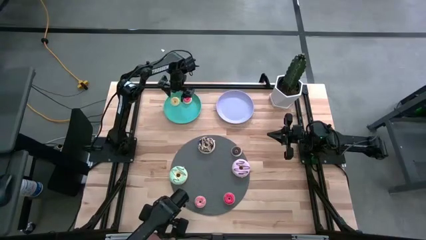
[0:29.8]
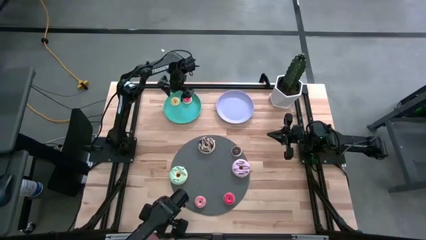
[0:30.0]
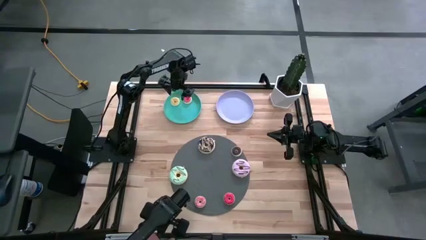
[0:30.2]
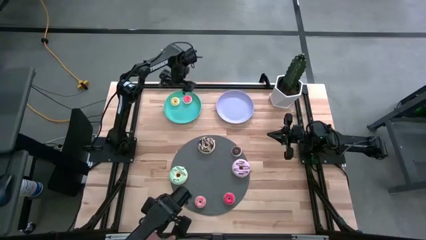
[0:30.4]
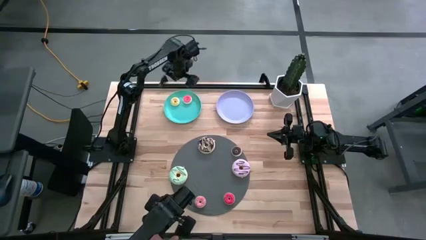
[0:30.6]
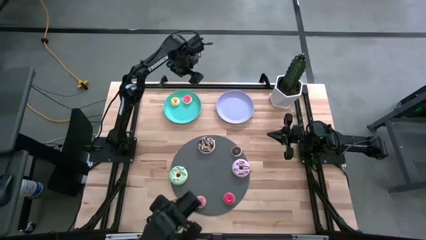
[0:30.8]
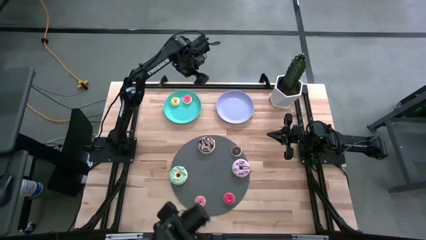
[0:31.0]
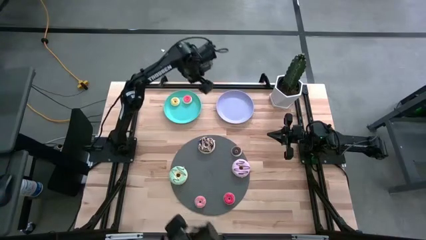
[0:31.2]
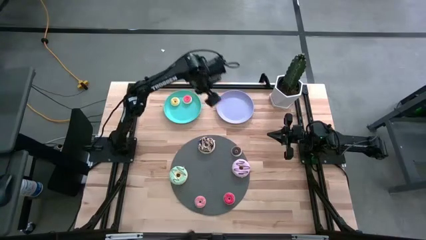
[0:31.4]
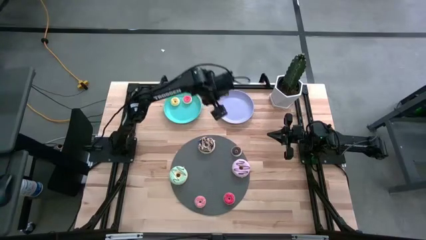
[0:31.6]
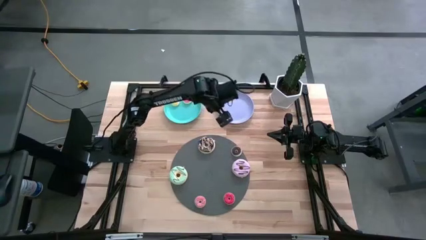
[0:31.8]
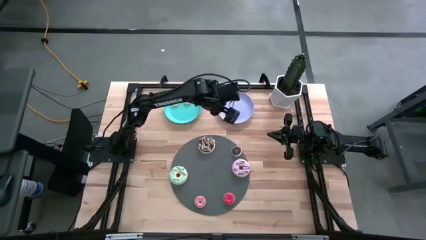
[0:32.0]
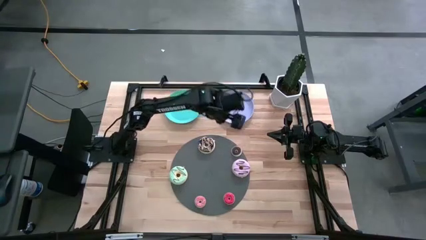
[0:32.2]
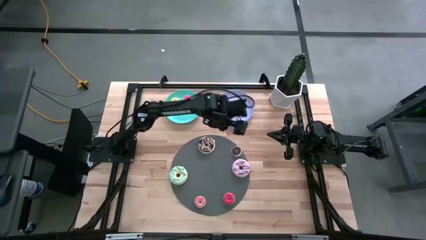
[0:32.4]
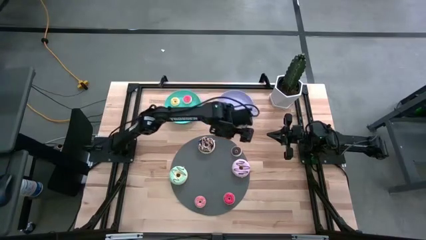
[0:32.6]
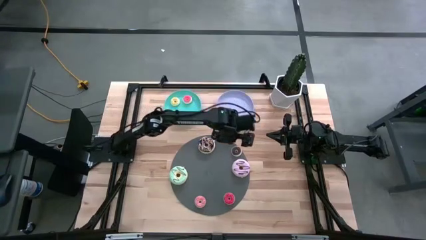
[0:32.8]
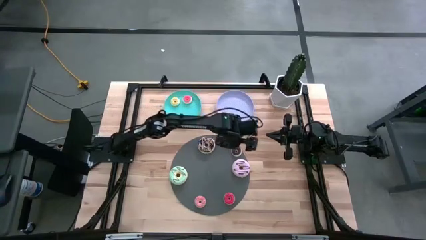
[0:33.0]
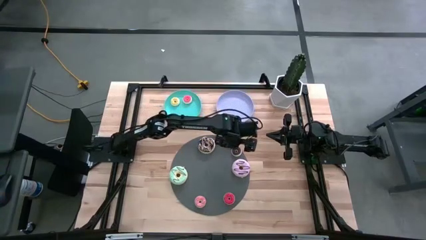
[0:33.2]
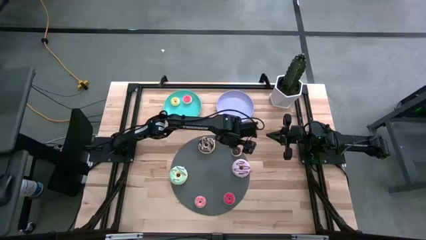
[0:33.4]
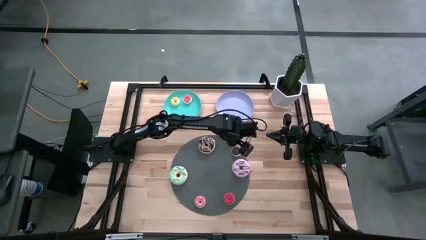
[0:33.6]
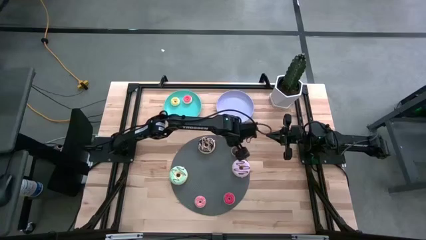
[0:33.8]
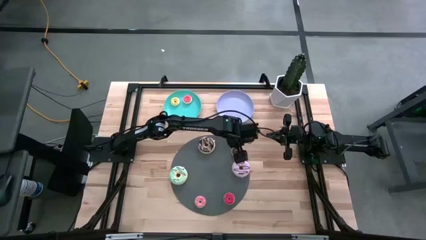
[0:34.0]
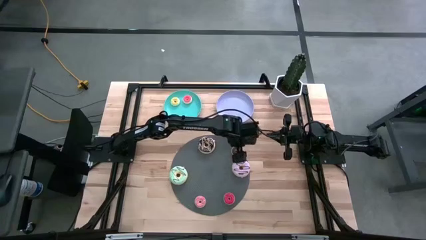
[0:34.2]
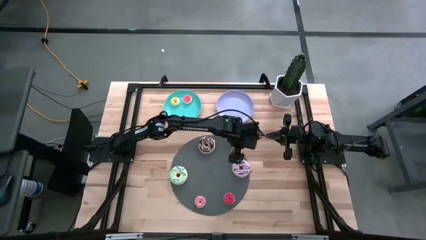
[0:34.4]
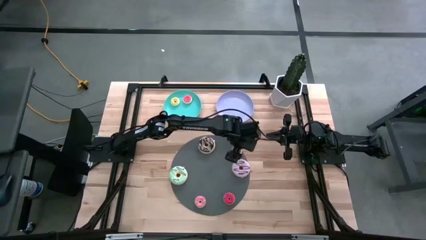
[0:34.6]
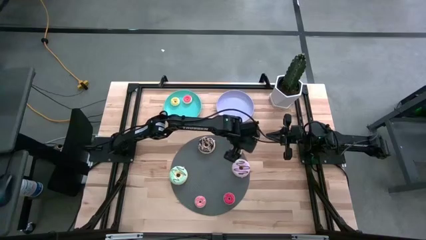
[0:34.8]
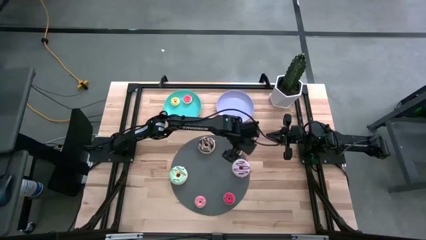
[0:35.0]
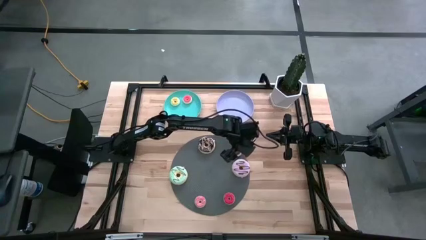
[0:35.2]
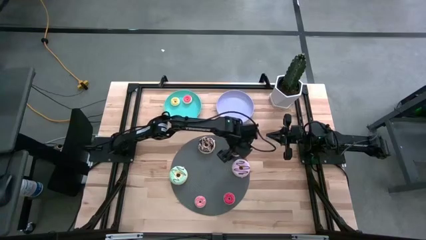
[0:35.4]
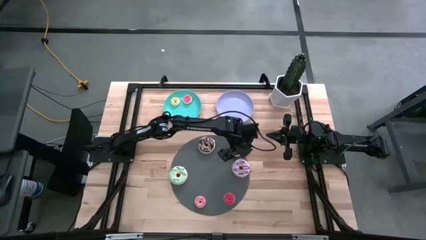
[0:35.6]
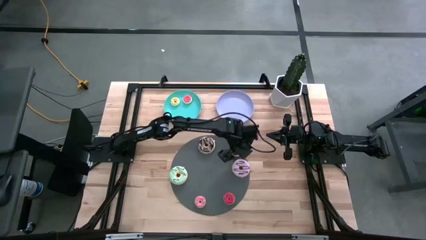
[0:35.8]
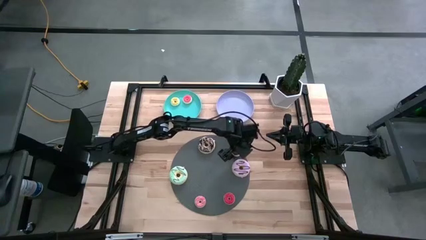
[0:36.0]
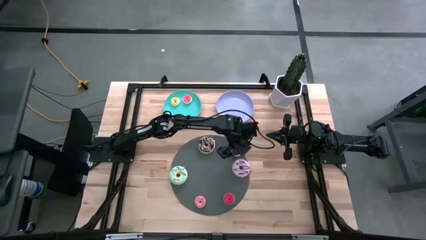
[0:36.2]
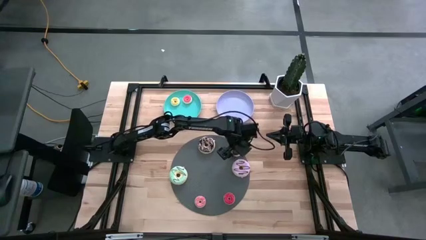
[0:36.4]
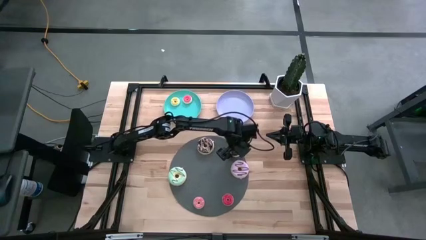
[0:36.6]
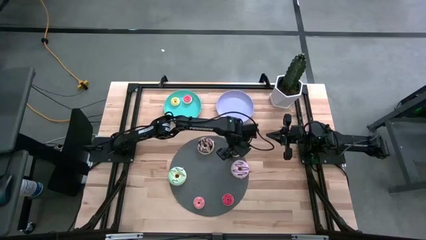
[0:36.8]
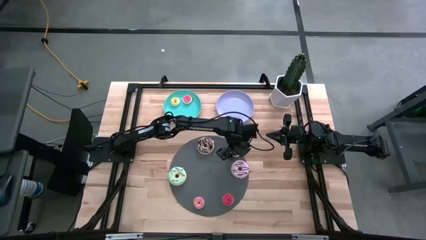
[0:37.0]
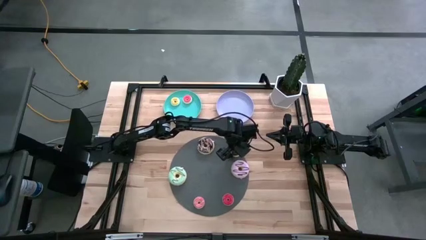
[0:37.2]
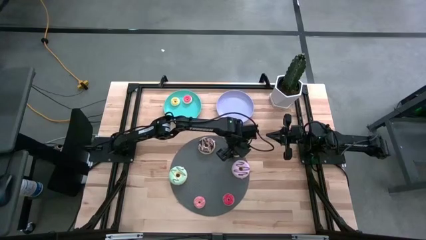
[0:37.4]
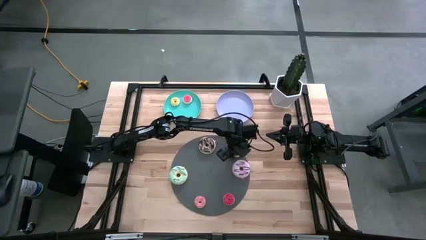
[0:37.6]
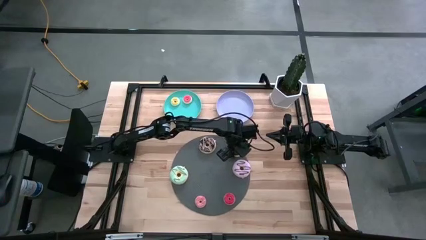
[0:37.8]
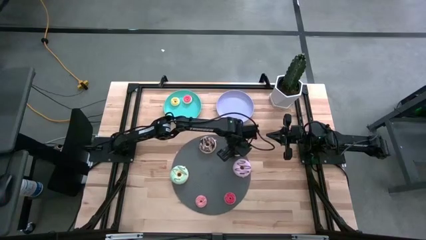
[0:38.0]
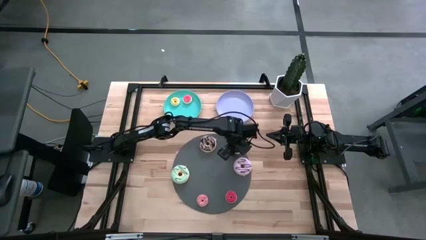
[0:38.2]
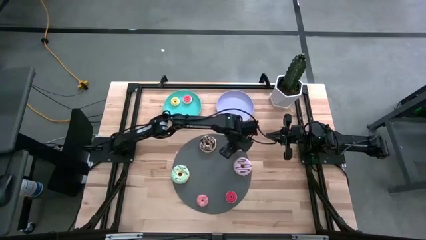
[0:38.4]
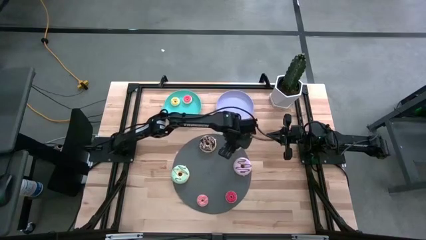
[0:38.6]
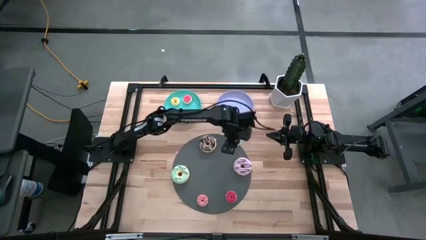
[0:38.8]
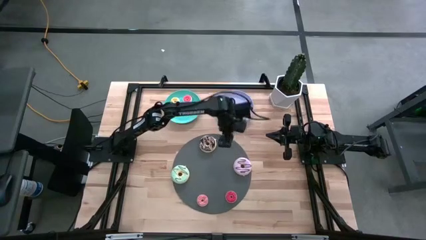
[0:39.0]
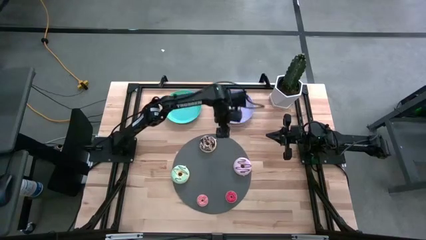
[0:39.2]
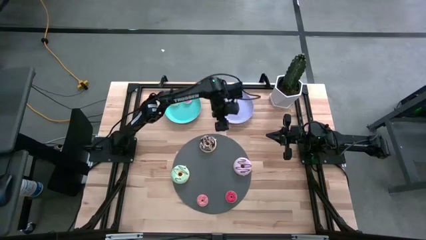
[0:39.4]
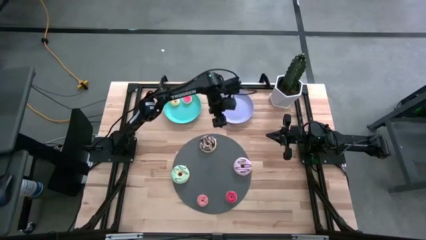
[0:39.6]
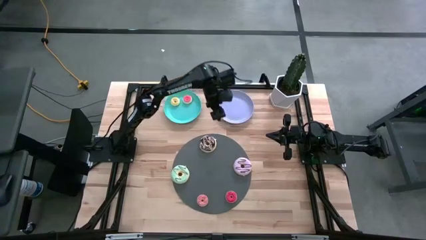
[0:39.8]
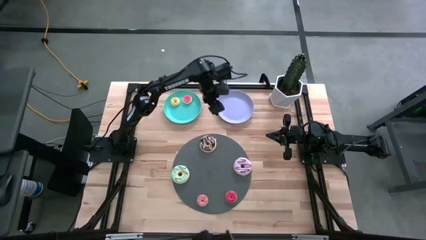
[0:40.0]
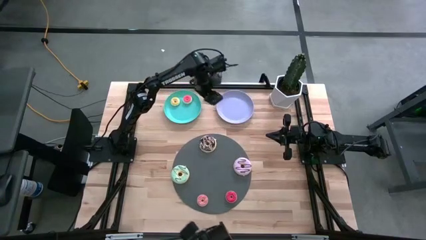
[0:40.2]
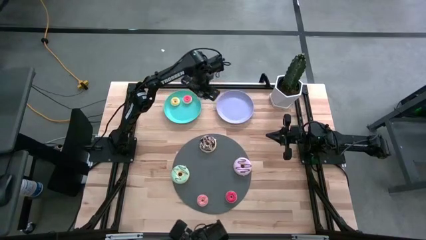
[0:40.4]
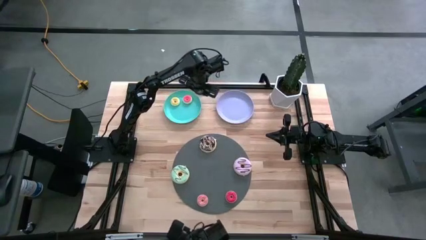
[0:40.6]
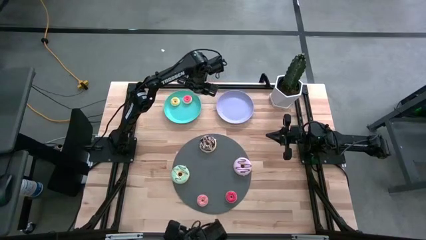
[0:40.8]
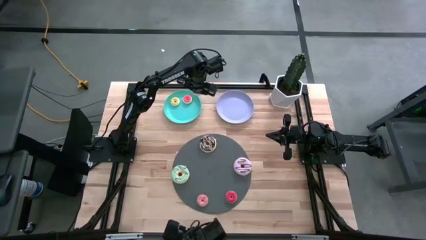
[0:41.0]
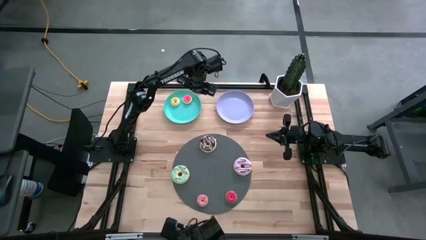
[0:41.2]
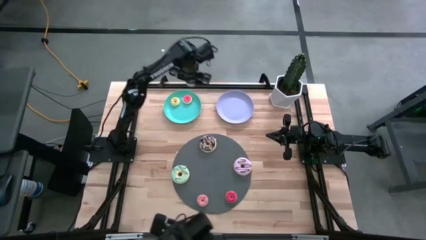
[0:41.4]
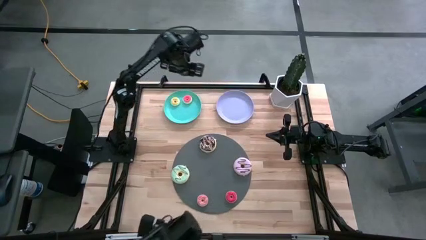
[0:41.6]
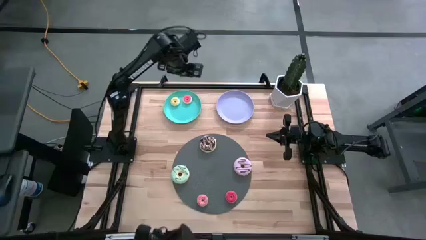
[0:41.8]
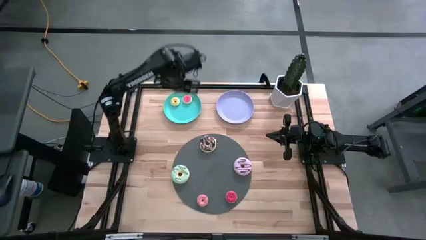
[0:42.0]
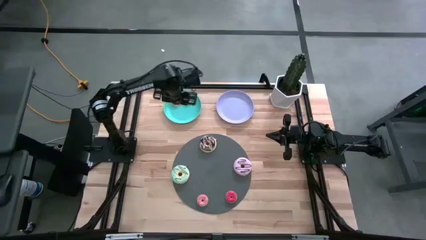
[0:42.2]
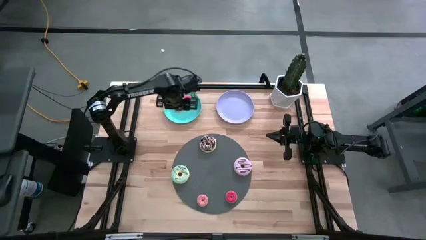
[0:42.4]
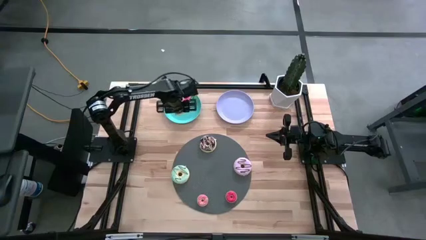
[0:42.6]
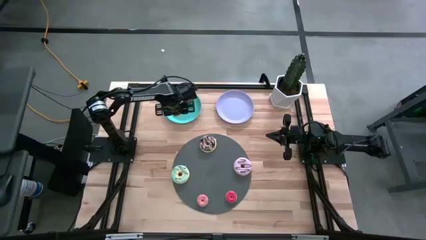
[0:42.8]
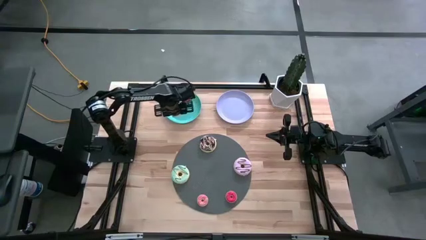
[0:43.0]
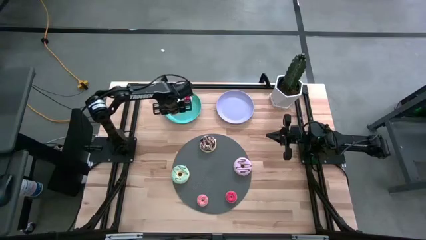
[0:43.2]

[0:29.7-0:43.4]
Task: Pick & Place donuts
Put the small black donut on the green plate

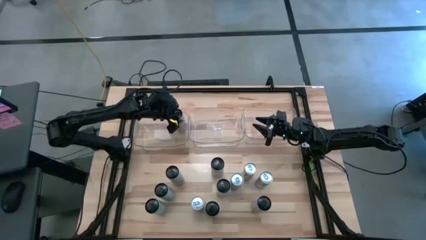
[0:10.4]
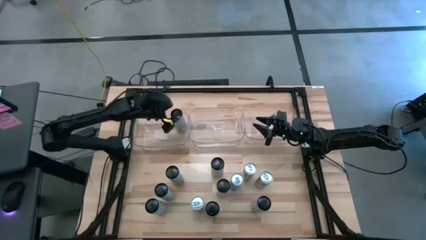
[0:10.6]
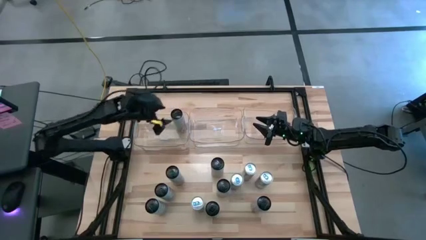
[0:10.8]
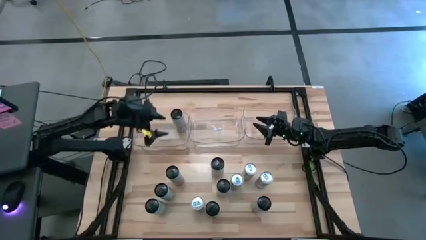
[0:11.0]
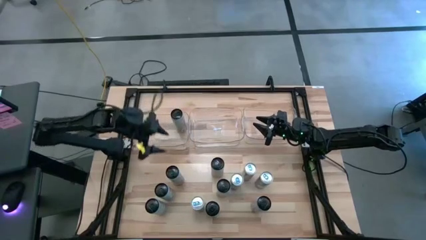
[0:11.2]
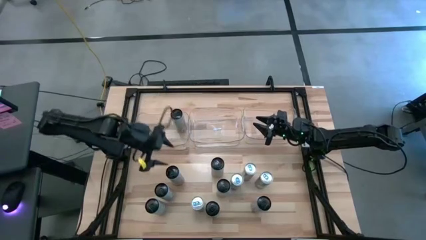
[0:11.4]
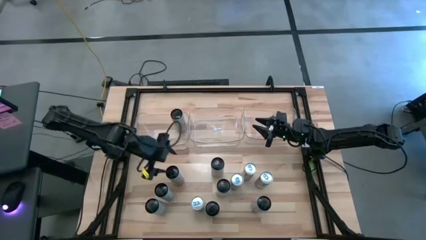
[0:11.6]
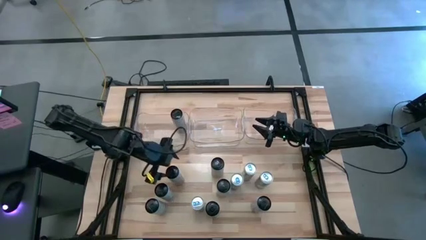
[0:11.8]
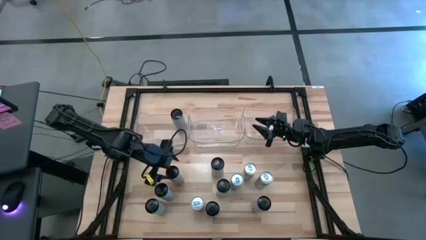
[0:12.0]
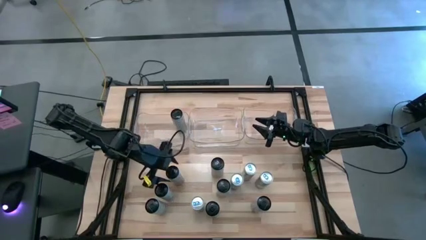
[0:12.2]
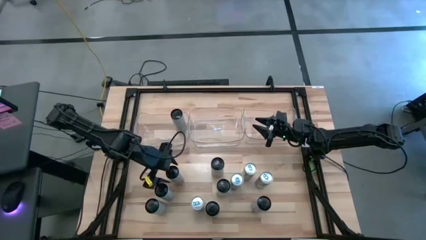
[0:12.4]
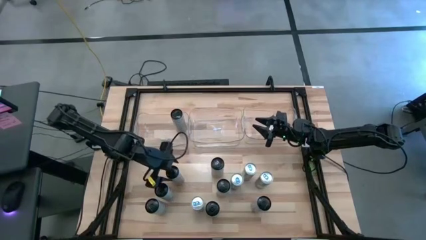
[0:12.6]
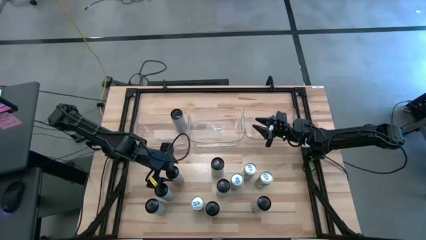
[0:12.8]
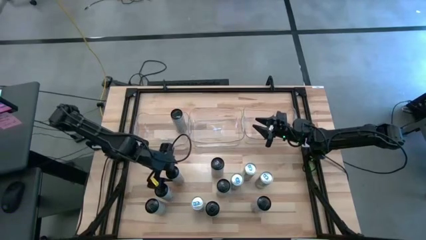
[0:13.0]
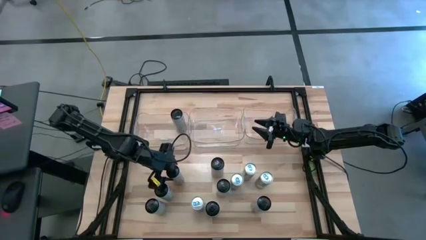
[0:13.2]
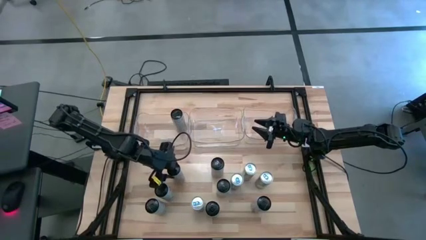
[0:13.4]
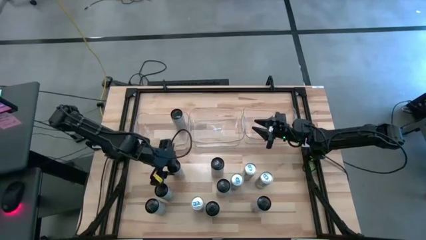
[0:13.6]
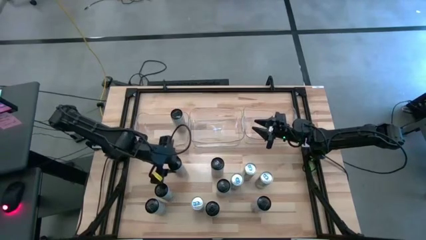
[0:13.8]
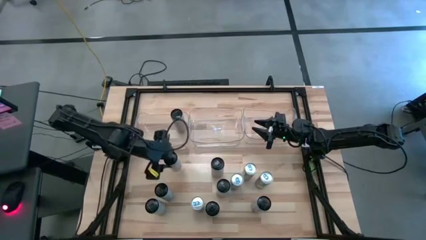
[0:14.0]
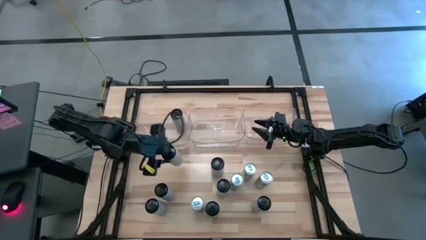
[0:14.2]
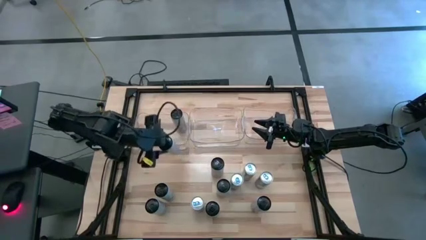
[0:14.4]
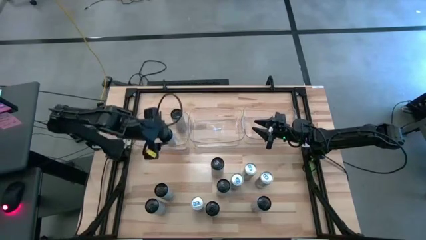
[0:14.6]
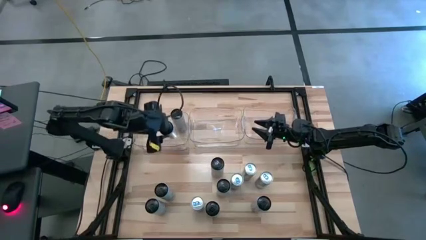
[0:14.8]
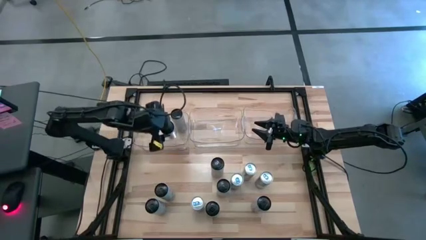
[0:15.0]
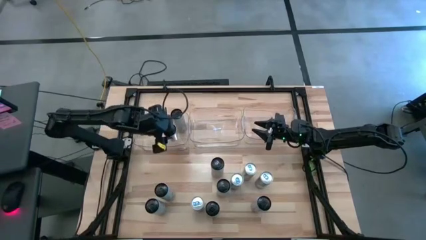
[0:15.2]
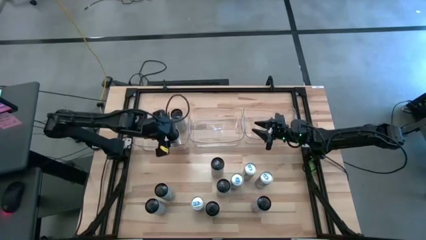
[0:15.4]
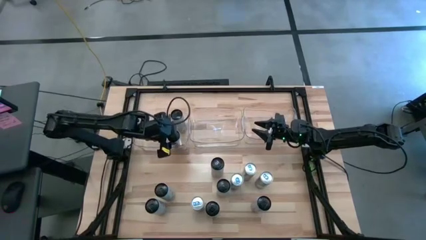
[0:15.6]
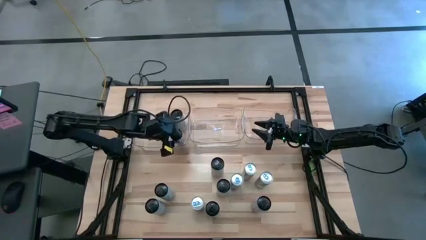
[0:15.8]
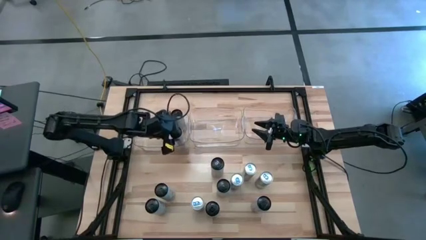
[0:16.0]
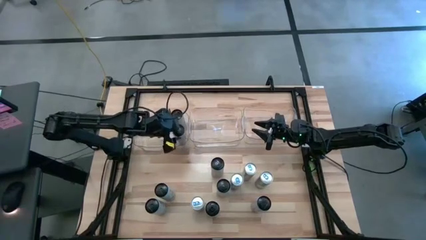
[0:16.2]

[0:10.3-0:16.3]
Task: Sort soda cans
Put the green soda can into the left transparent bin
